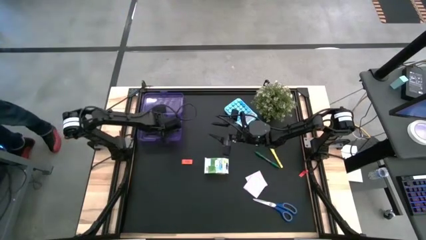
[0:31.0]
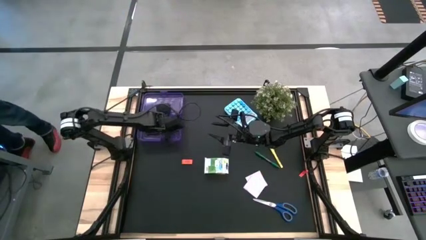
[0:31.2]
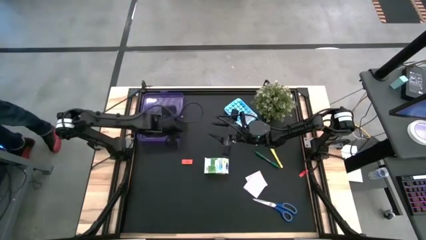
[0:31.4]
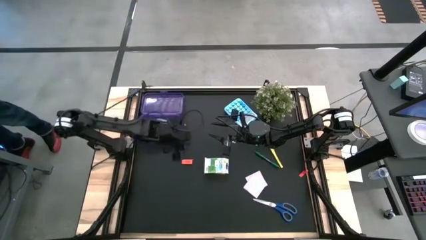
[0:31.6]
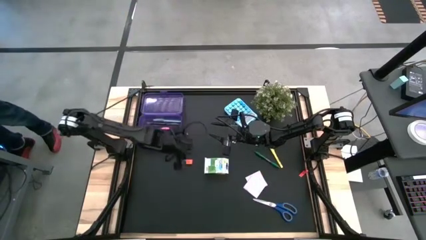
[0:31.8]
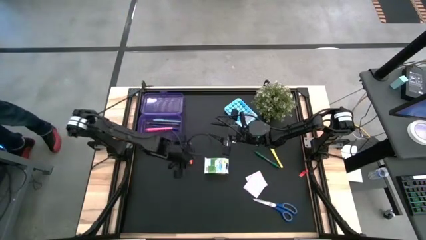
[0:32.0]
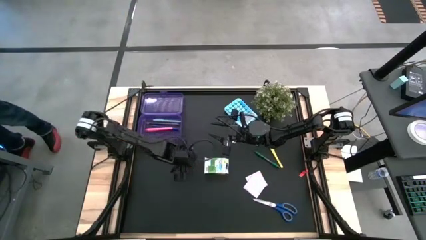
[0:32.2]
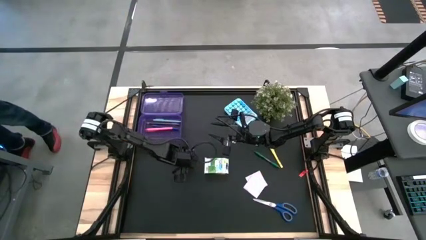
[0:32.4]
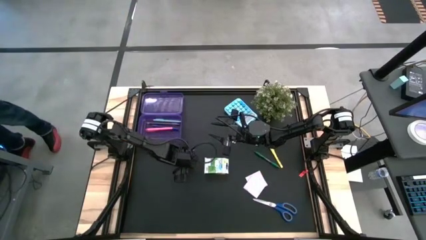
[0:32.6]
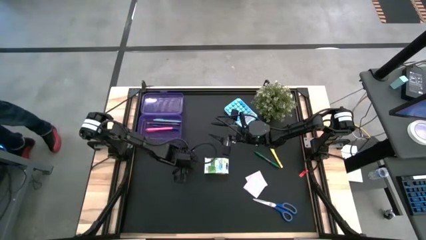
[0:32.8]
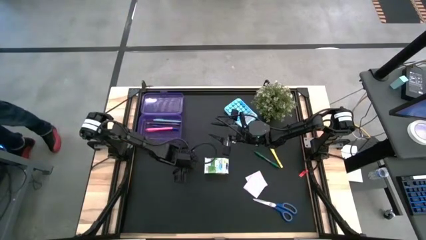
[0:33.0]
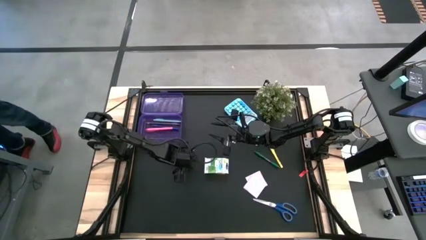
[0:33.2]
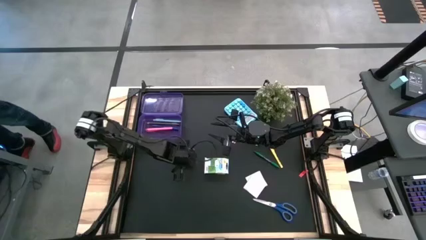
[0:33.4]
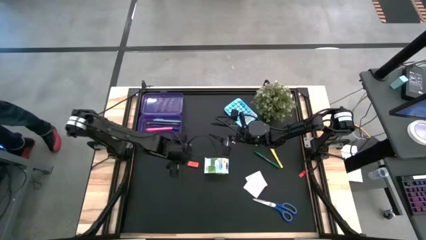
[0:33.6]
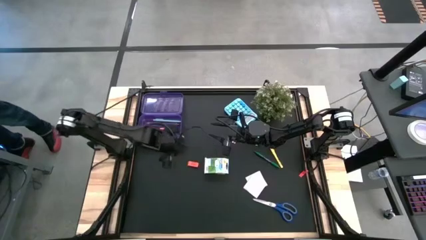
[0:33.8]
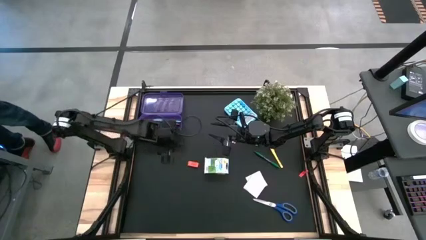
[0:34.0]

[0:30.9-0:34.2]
Task: Pack school essentials
Put the orange eraser into the purple supply box

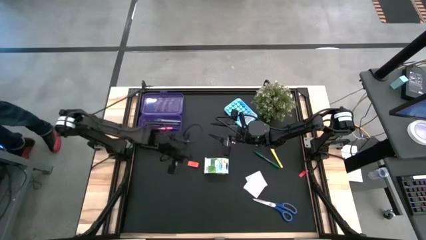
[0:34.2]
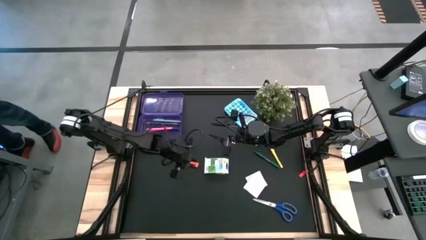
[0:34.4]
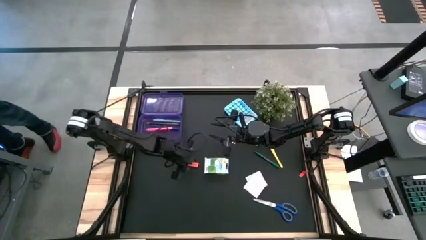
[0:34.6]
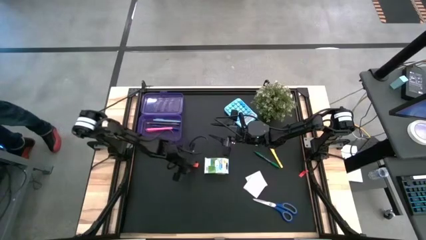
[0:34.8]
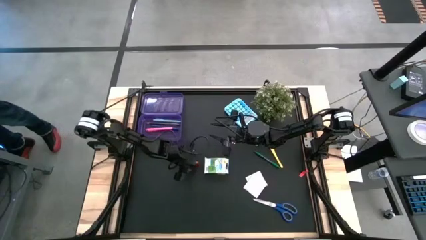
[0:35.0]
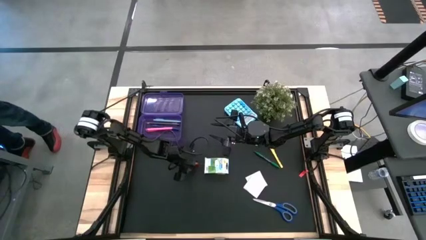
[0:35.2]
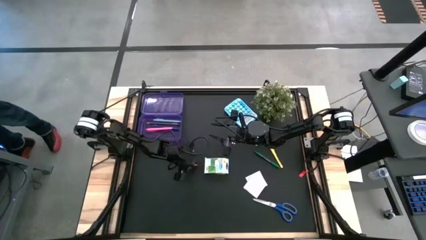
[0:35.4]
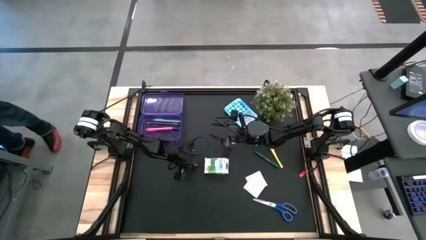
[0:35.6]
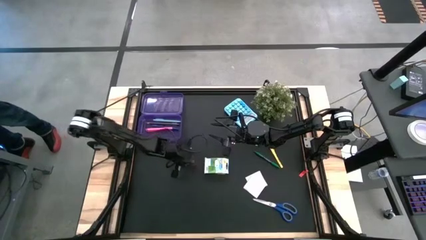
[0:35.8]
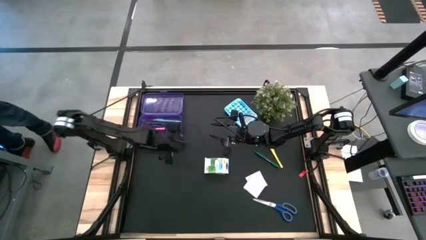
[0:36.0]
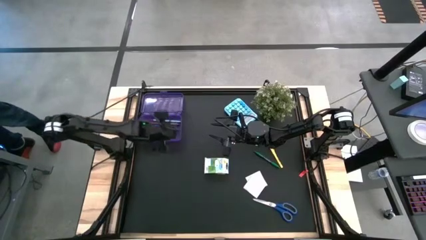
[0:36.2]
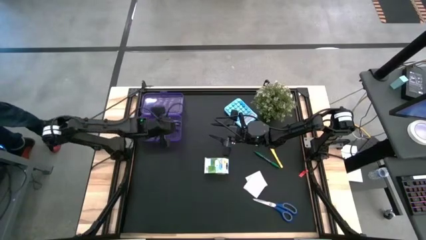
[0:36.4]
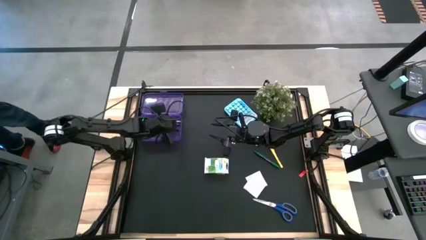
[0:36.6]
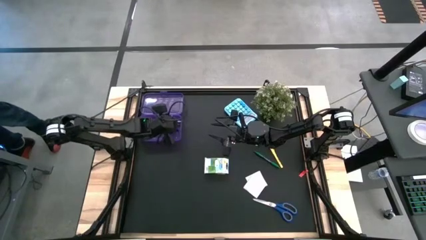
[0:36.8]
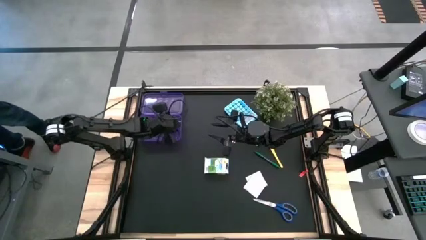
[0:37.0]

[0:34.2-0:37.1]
Put the orange eraser into the purple supply box

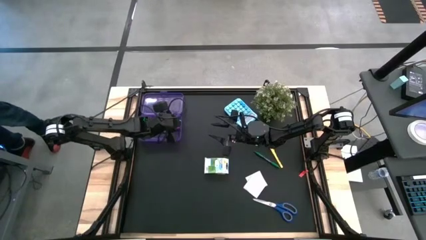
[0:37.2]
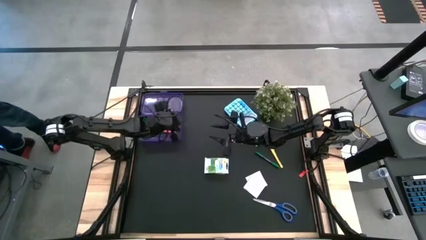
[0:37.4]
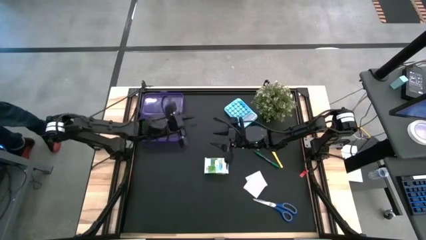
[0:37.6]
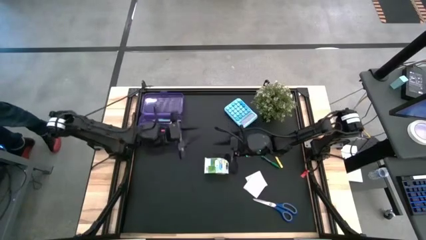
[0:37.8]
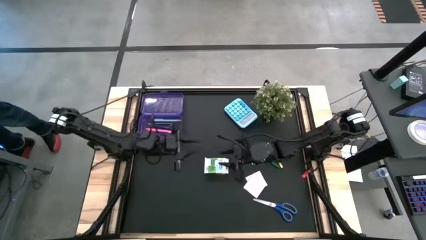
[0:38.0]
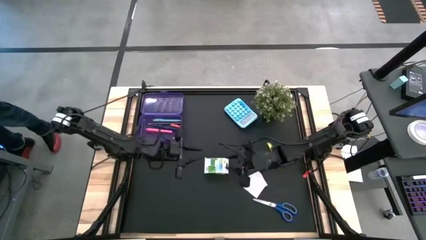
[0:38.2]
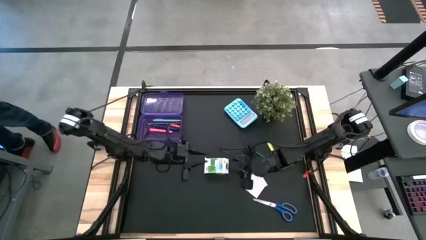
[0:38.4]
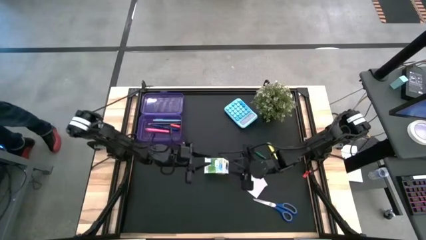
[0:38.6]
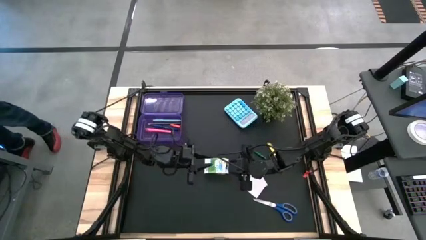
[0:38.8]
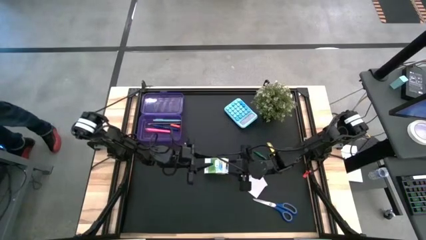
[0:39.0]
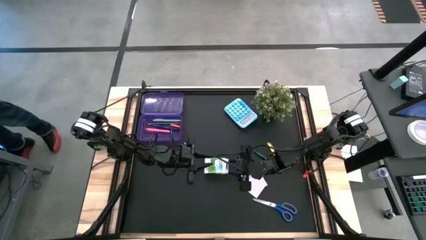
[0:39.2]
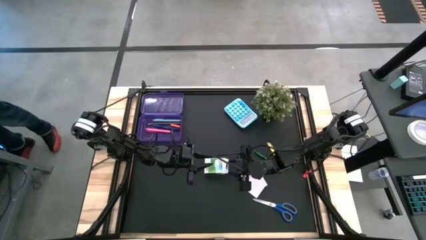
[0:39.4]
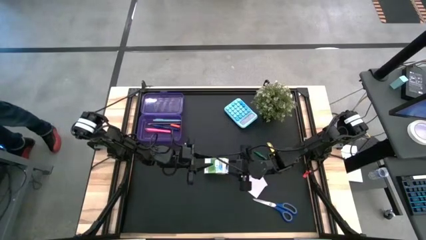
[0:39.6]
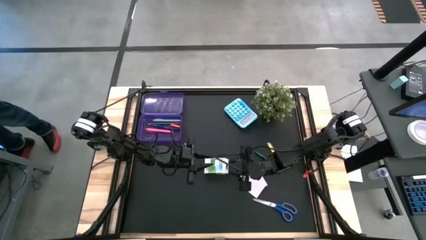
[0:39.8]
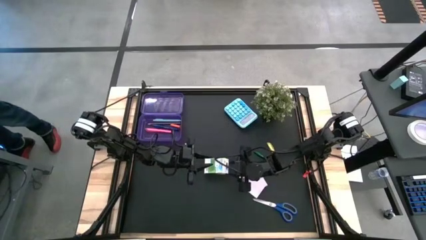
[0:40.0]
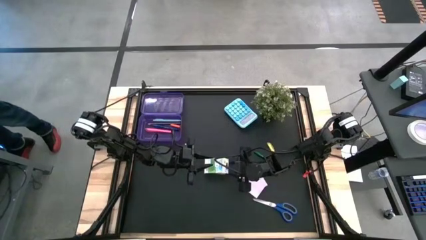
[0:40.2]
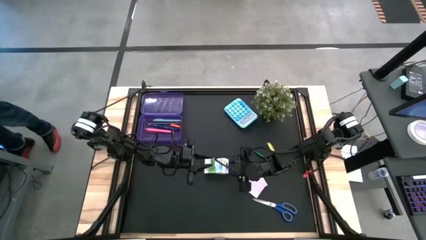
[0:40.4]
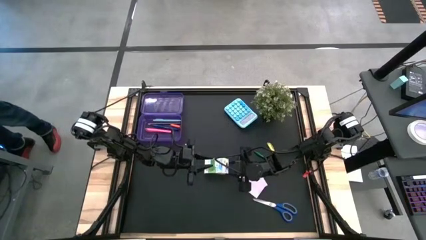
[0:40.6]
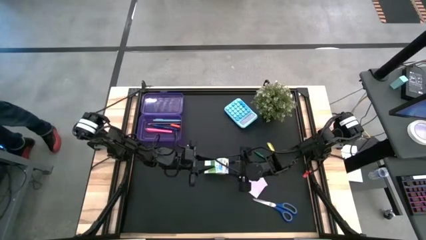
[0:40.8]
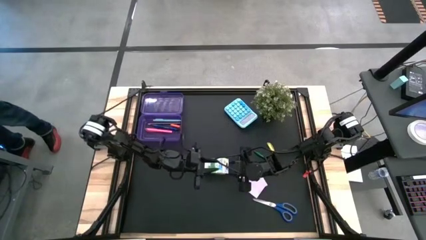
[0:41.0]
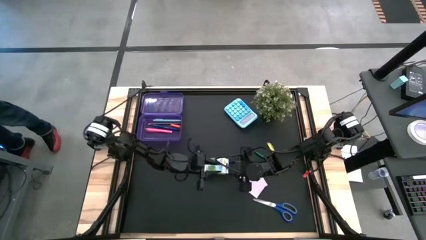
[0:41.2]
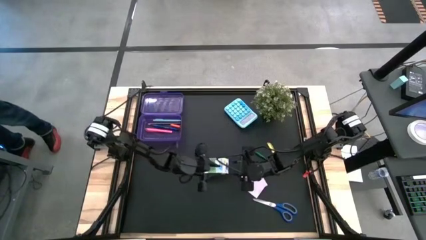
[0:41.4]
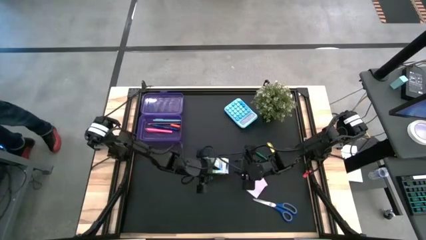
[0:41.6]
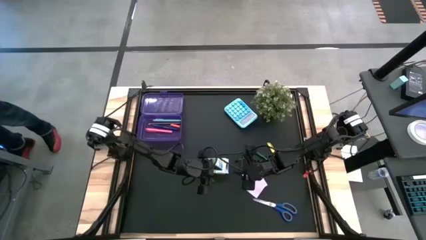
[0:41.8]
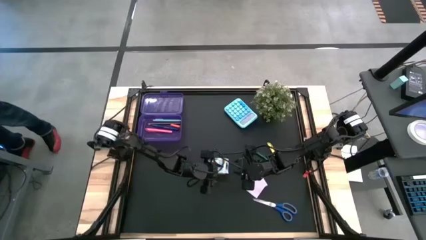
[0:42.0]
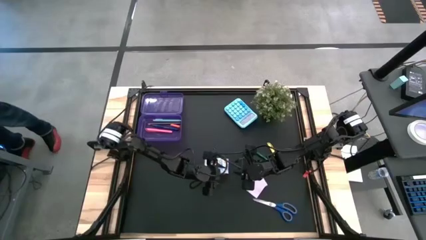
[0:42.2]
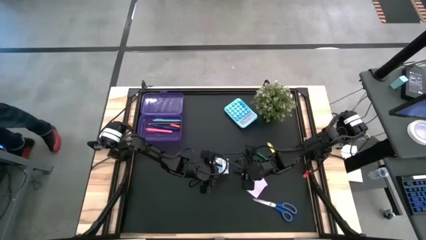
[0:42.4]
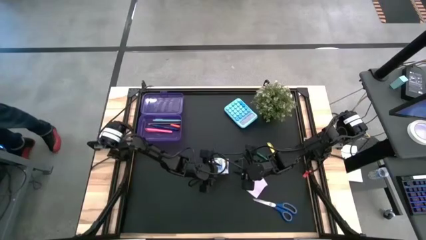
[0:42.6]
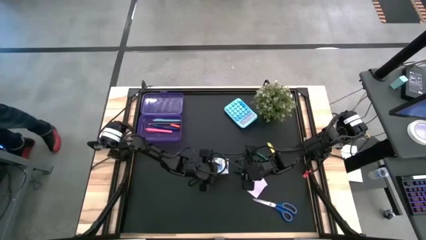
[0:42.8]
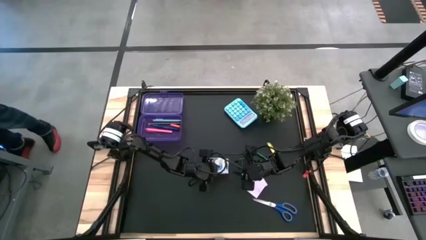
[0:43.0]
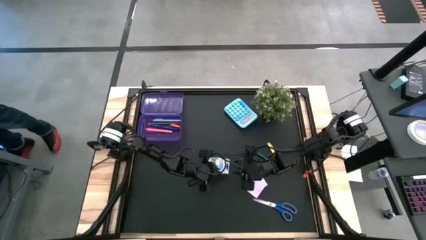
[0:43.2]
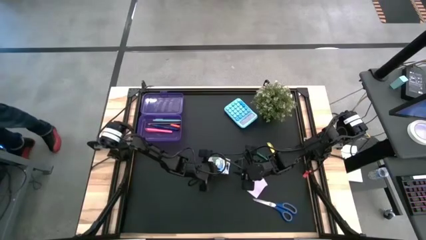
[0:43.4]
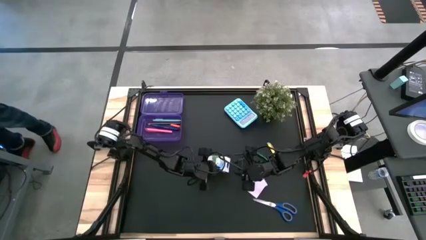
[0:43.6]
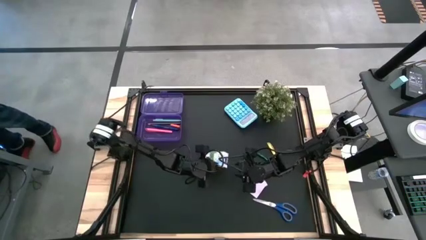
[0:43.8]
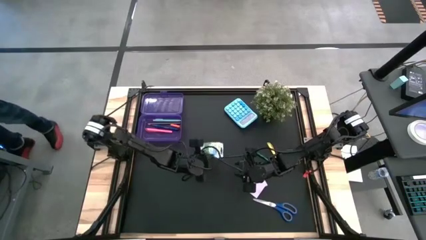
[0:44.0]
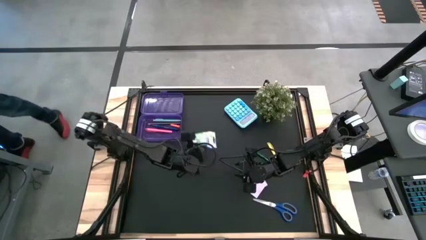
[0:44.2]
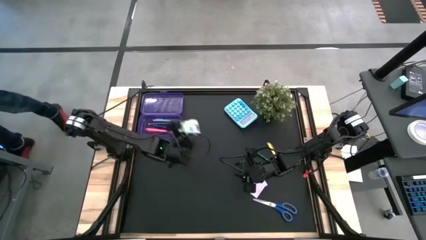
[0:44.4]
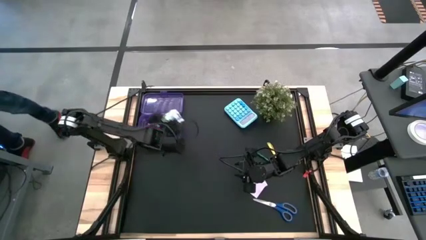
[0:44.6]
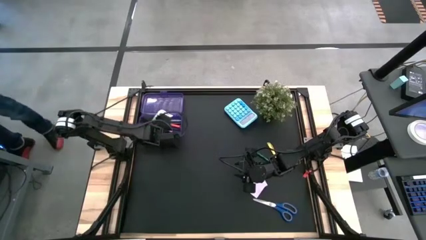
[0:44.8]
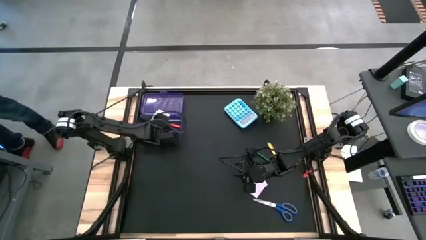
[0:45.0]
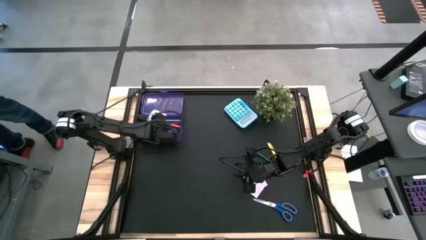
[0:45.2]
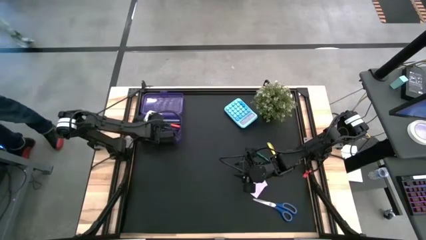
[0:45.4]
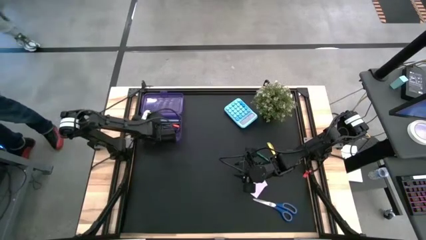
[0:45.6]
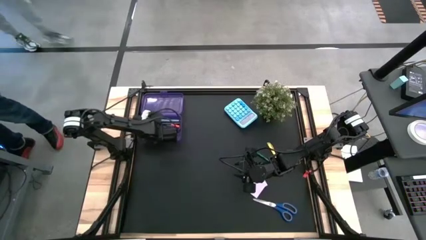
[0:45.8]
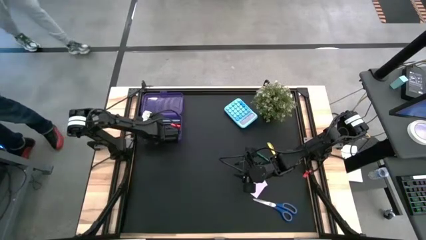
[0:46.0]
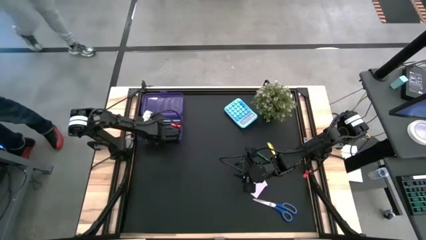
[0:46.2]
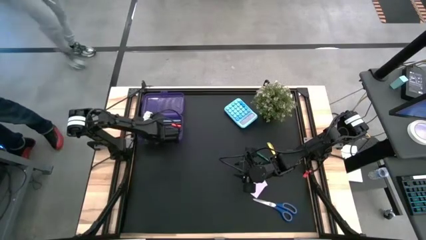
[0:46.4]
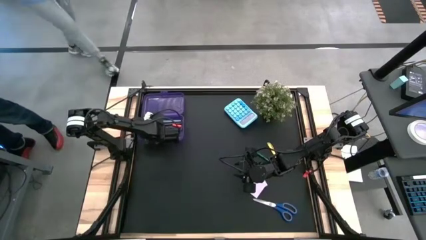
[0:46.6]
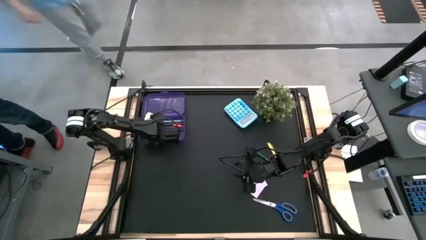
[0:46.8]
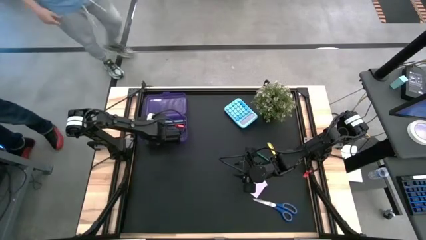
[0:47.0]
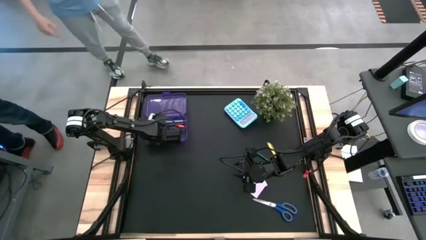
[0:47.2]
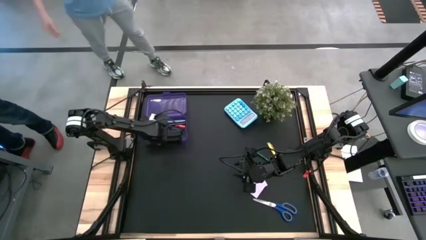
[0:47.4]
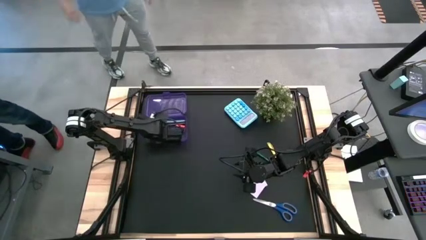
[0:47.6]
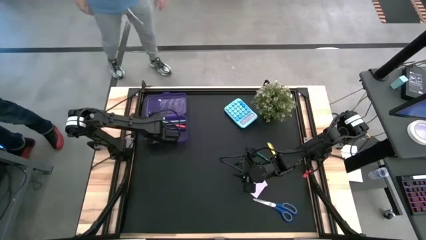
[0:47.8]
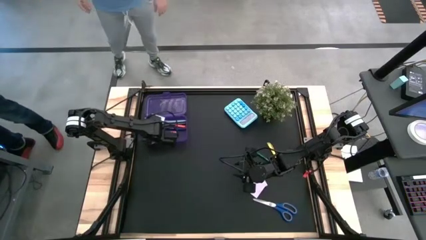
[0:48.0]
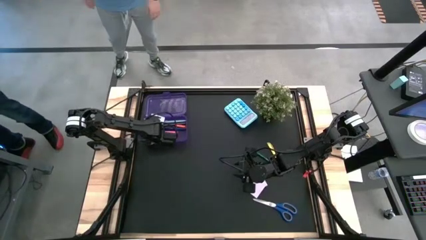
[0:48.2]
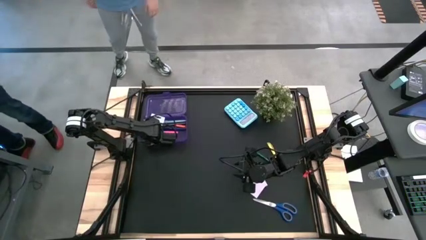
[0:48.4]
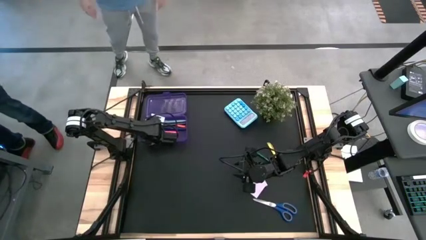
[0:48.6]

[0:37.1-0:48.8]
Put the green crayon box into the purple supply box
